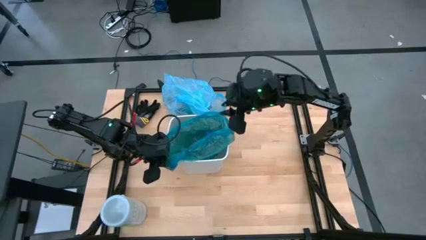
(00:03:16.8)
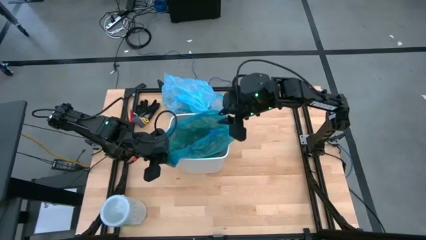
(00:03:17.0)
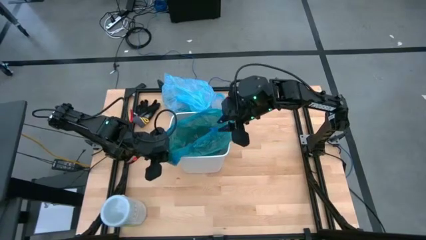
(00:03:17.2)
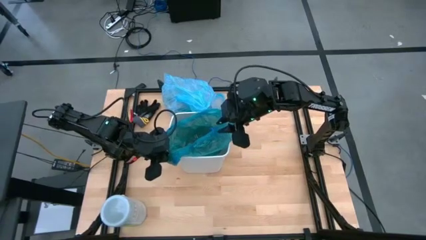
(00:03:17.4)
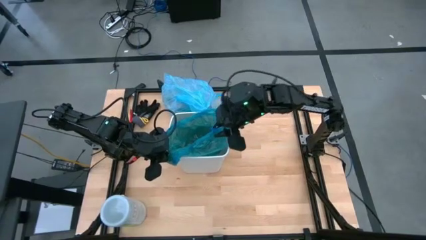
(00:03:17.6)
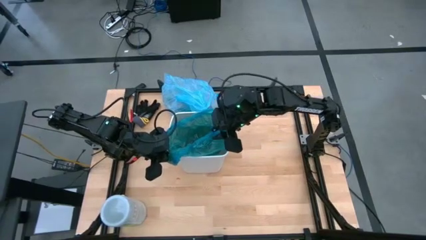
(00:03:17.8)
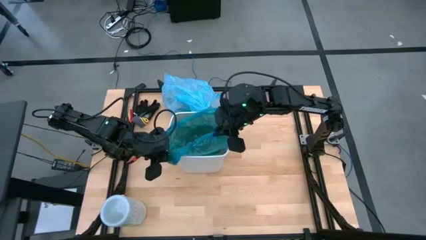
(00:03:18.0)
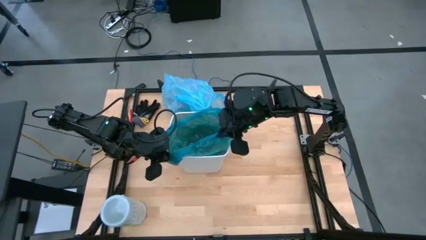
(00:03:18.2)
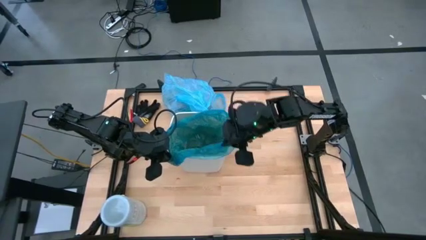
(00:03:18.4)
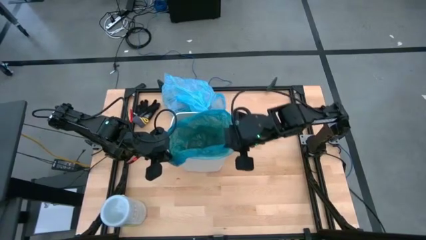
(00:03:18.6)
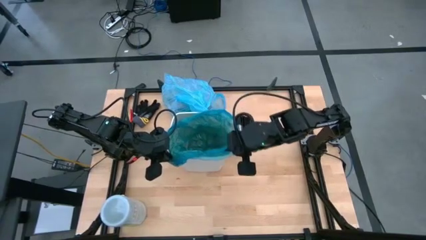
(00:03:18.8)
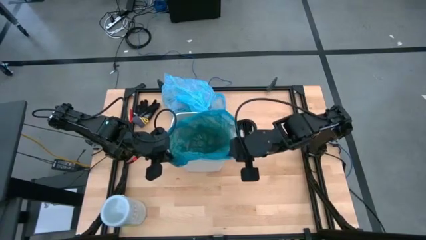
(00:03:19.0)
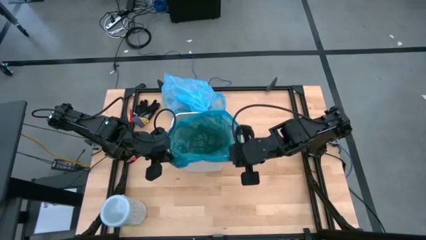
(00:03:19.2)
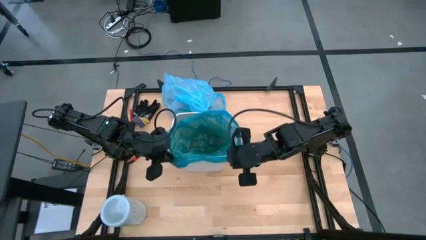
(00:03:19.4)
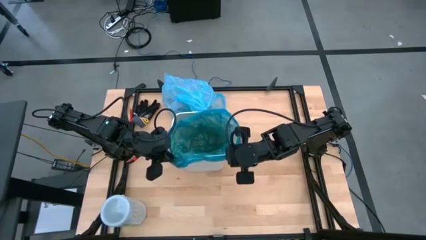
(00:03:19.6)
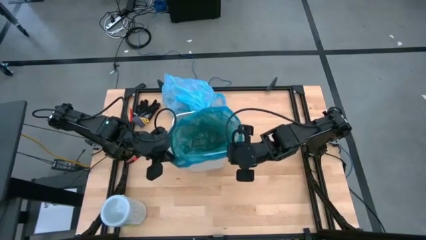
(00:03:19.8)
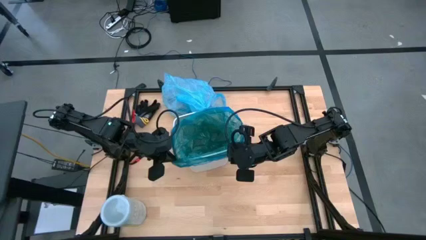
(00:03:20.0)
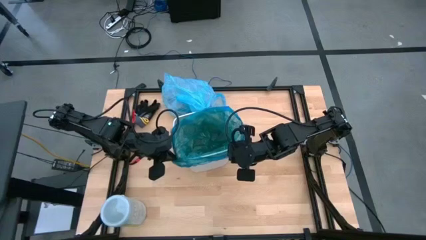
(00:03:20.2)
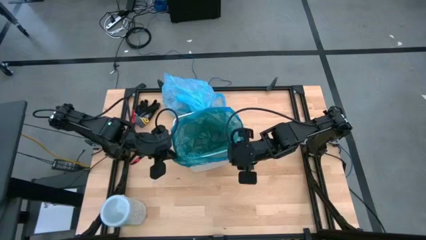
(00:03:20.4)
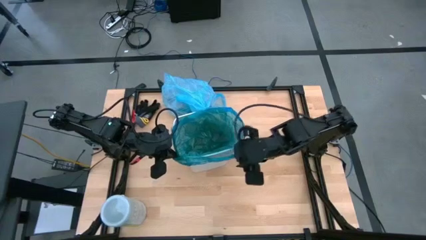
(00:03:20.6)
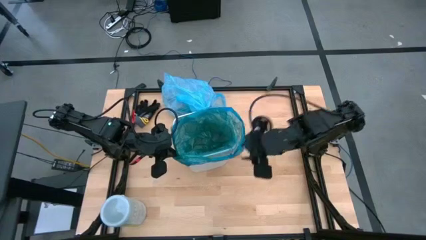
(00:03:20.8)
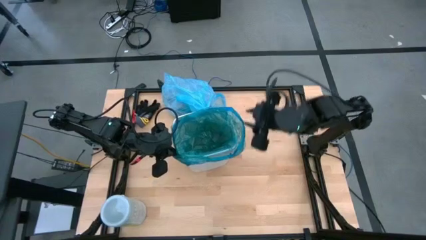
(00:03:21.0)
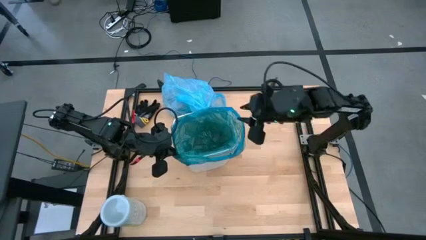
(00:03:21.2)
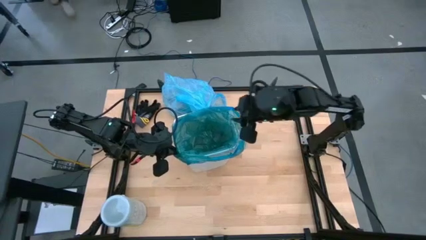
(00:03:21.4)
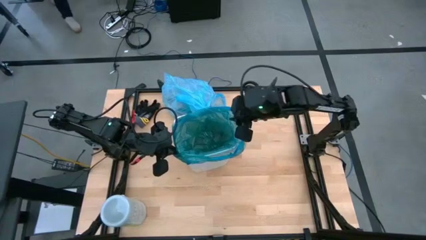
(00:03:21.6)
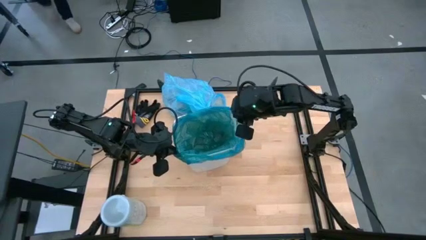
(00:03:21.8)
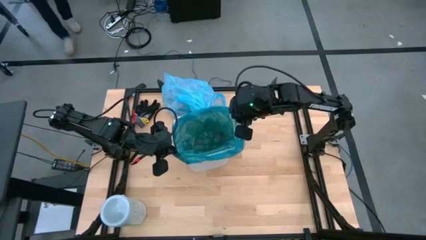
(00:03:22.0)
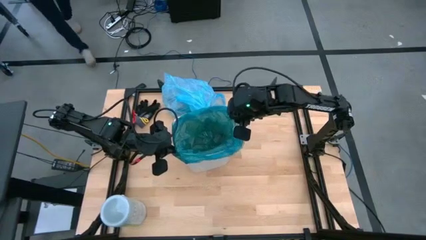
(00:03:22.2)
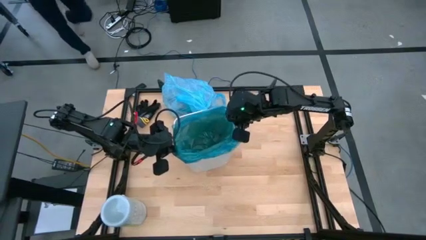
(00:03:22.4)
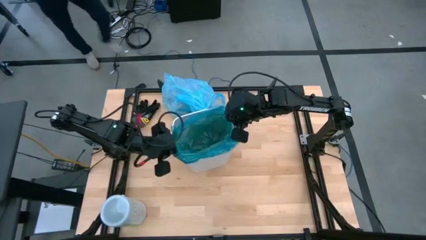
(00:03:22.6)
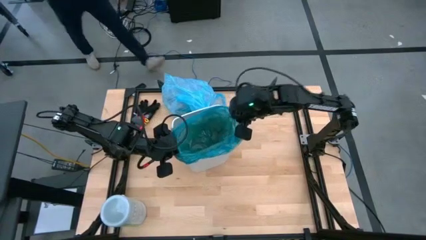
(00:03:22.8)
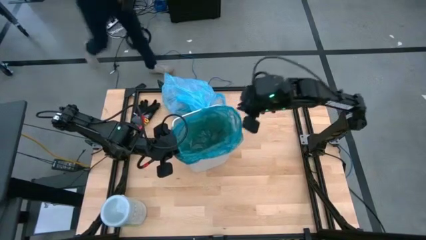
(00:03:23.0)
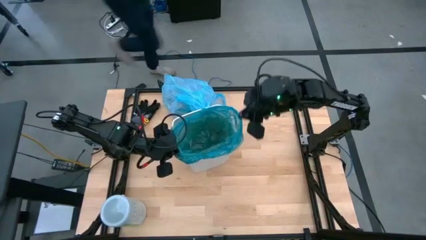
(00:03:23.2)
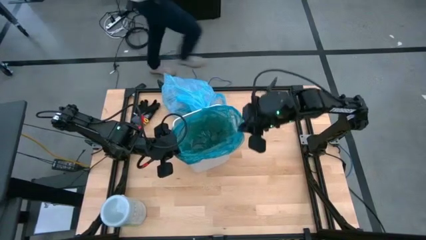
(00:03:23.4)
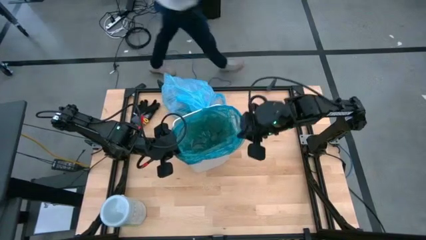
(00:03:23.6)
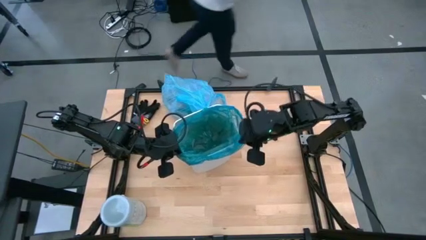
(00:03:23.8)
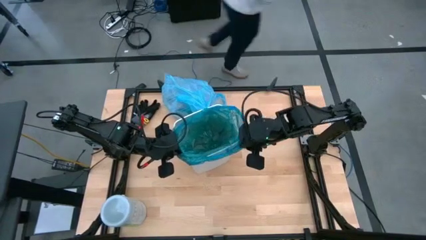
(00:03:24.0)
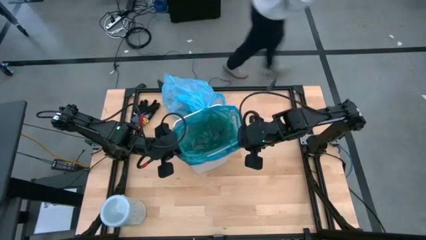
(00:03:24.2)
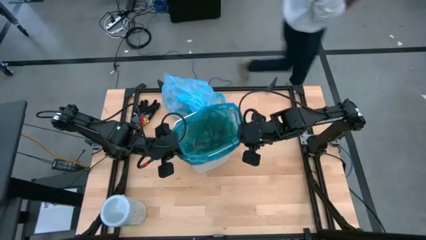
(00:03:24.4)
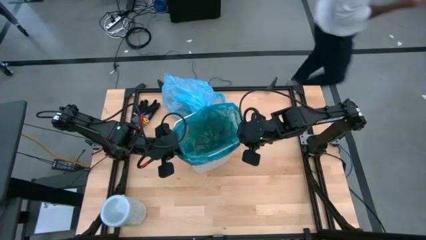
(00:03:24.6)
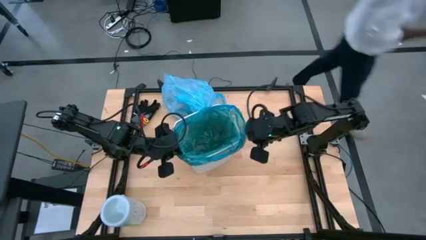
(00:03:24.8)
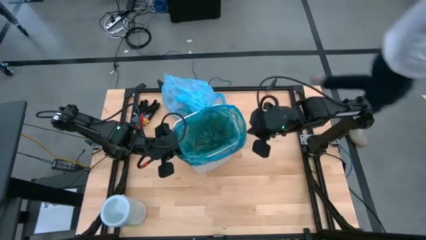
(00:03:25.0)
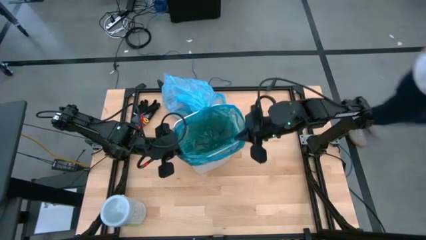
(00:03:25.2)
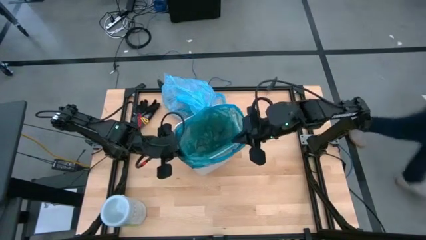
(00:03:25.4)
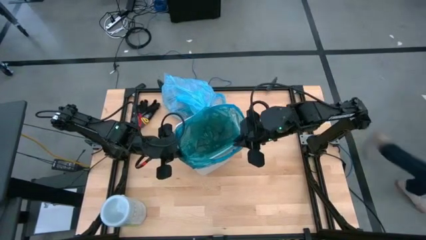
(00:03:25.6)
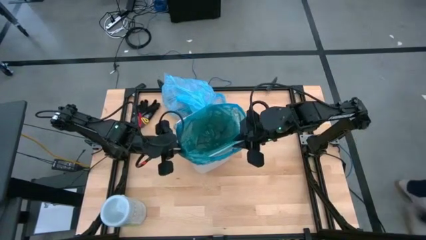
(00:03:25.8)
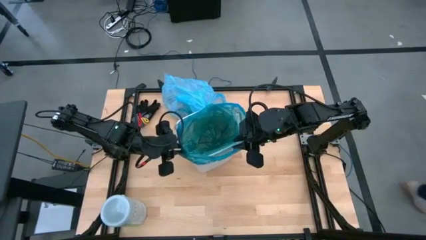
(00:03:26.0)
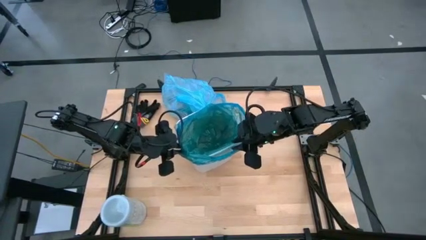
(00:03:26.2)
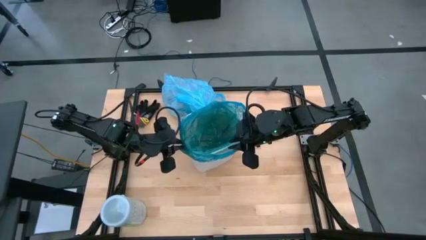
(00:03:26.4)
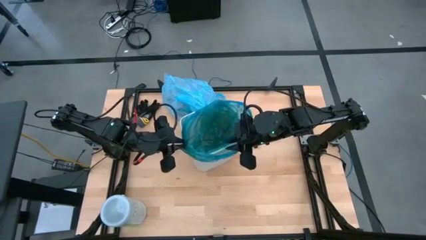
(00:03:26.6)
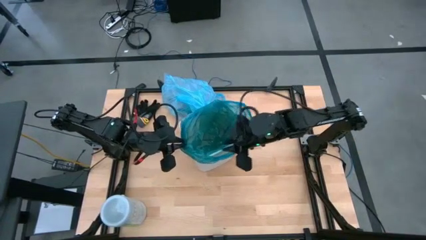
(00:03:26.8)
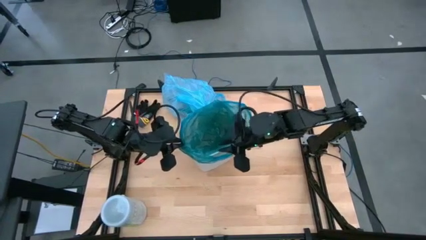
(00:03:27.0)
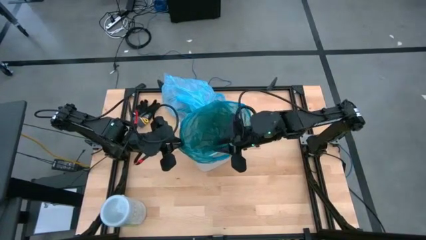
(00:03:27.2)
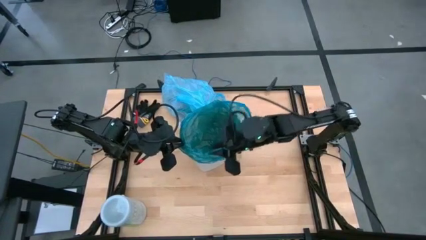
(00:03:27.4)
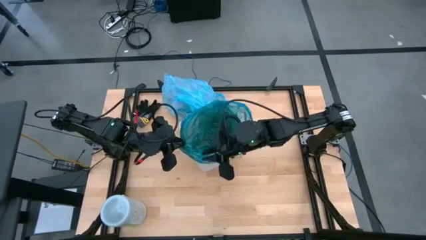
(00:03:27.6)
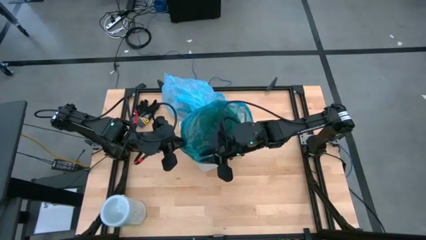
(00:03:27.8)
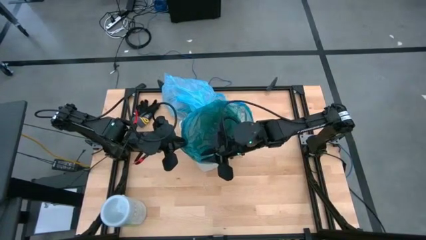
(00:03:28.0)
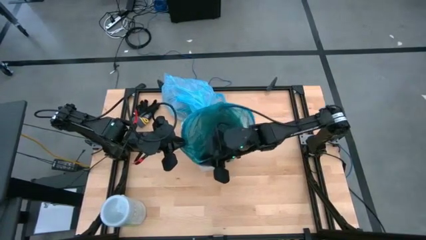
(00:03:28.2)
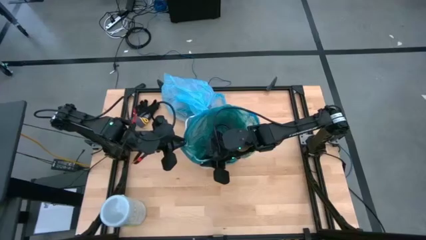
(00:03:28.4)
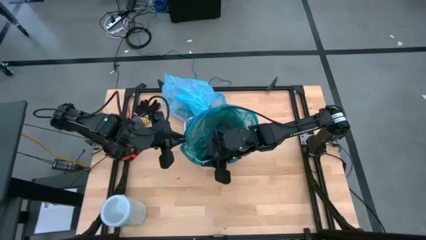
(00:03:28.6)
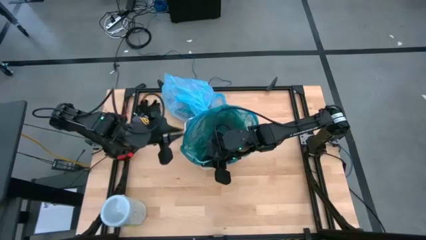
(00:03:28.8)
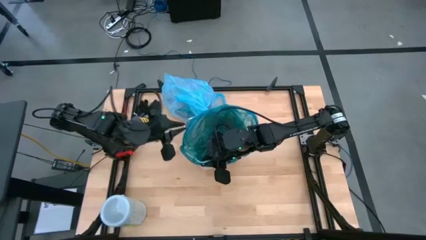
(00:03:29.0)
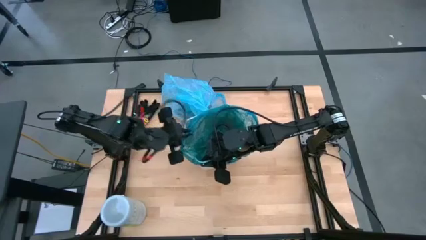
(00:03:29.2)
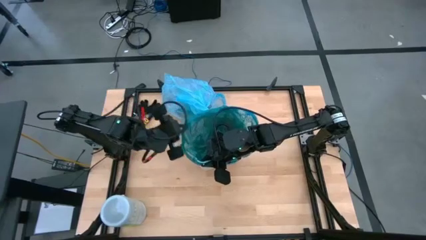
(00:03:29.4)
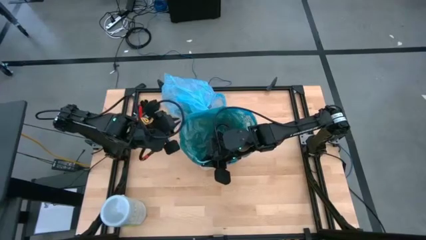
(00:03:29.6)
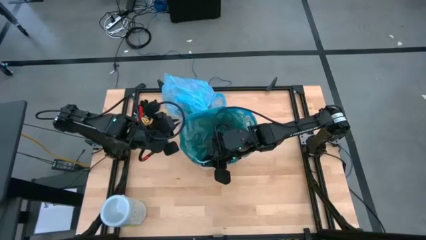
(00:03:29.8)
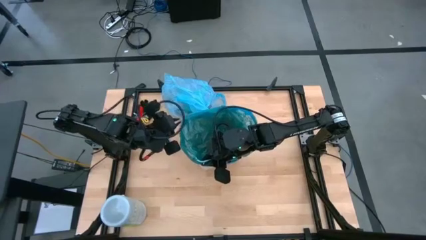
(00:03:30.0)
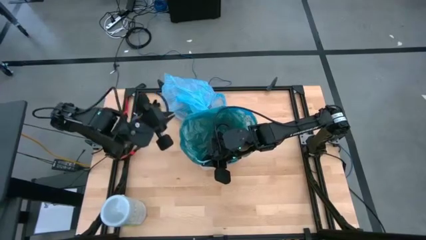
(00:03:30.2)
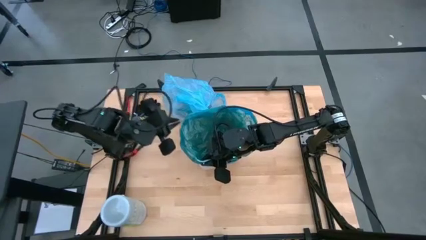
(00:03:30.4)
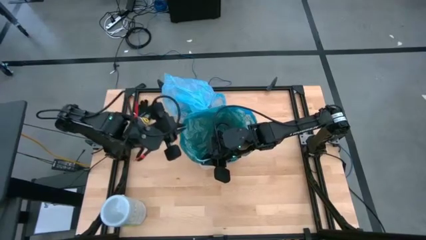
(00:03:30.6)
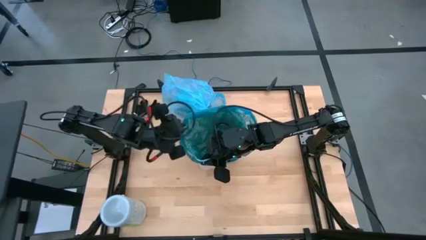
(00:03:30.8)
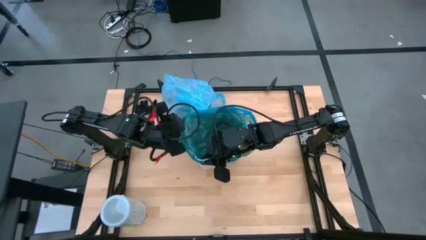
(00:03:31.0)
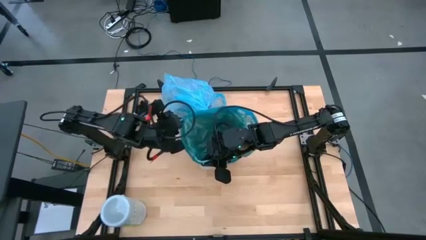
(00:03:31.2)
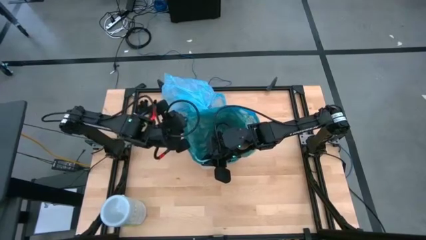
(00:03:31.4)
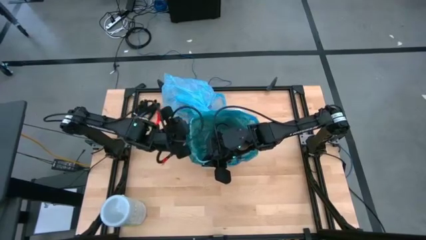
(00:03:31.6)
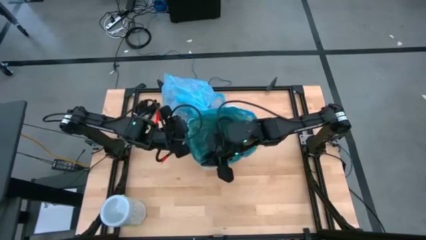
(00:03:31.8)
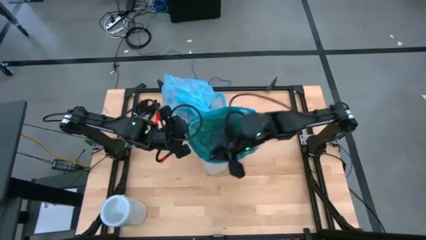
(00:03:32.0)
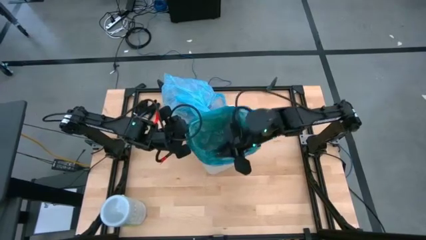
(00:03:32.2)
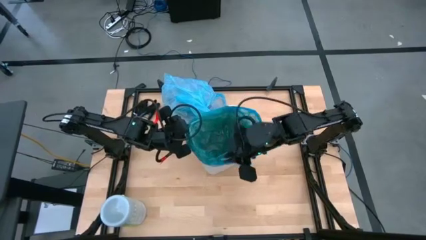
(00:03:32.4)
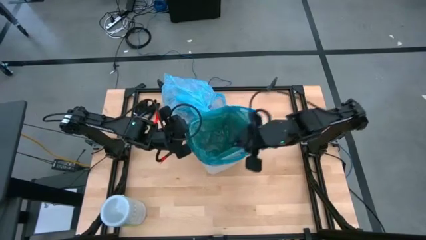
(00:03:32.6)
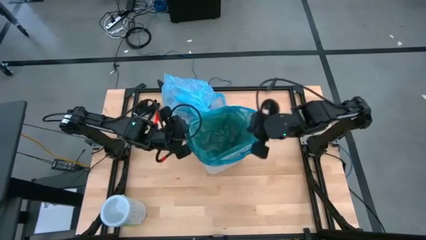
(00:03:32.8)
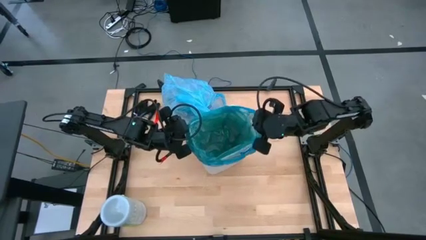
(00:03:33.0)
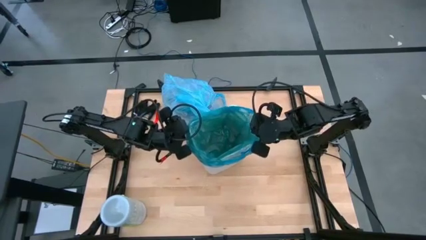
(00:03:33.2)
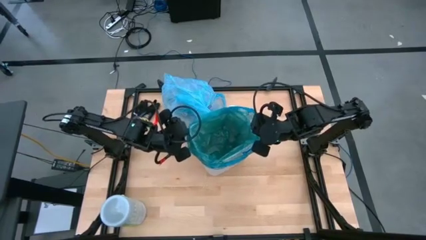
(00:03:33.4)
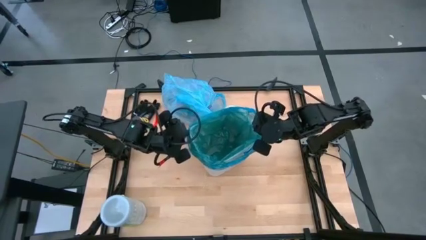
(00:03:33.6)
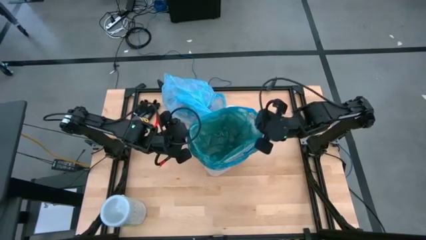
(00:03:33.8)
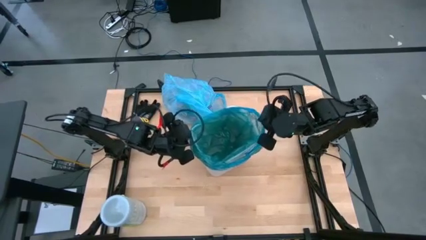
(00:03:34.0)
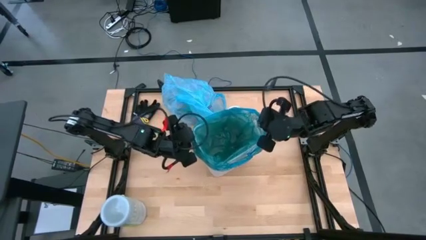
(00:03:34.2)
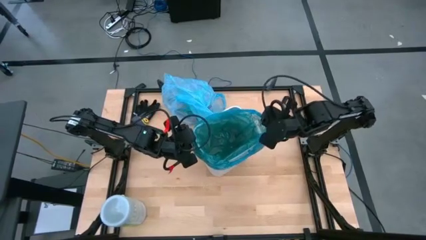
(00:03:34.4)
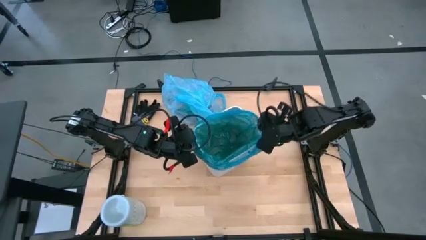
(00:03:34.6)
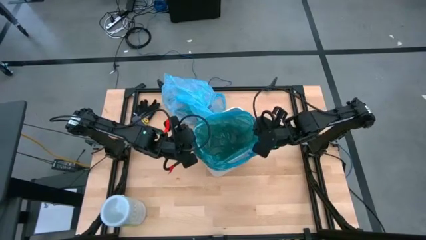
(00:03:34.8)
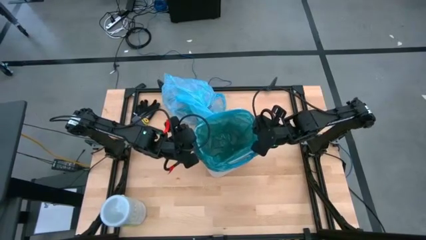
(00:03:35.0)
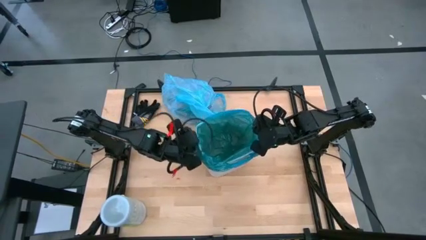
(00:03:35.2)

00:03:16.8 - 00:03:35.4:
Task: place trash/remove bag and relplace
Insert the green plastic trash bag into the trash bin
